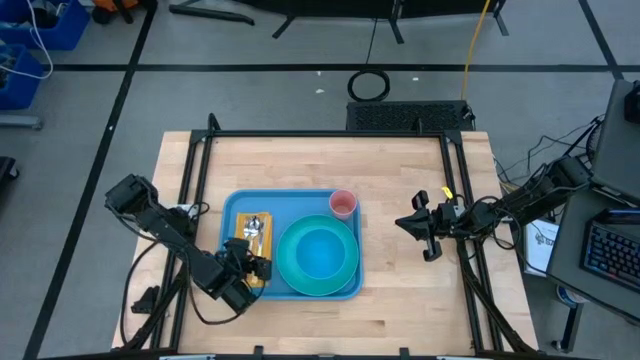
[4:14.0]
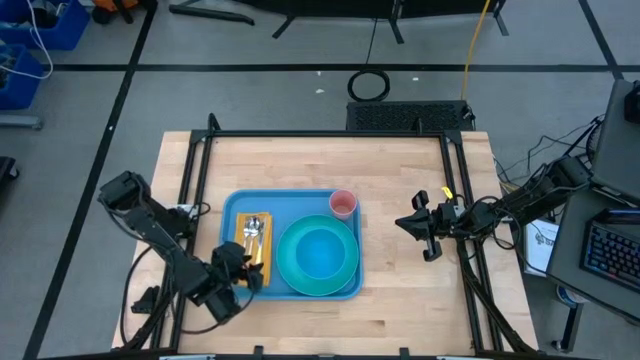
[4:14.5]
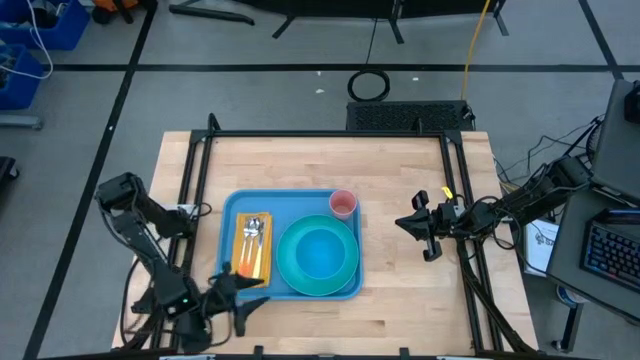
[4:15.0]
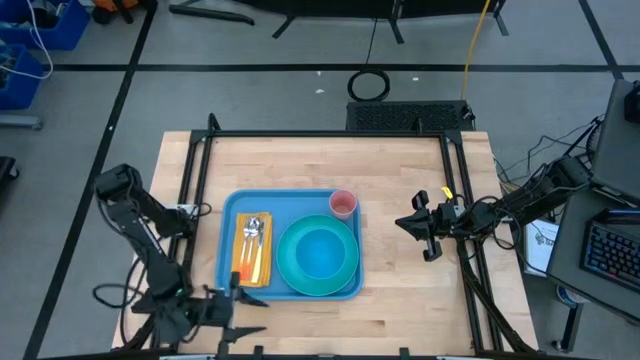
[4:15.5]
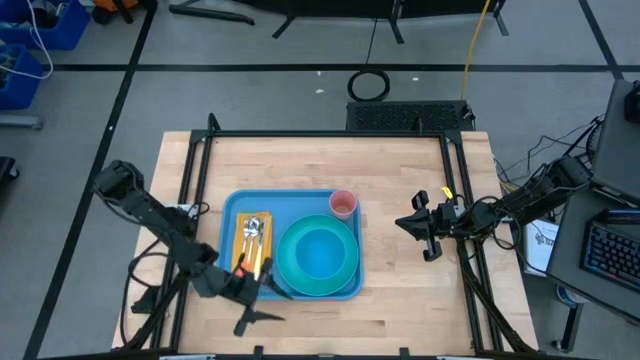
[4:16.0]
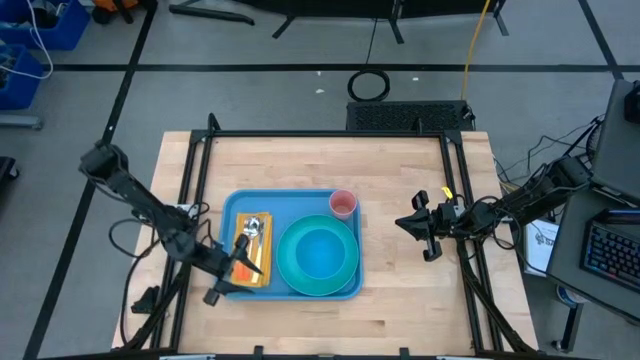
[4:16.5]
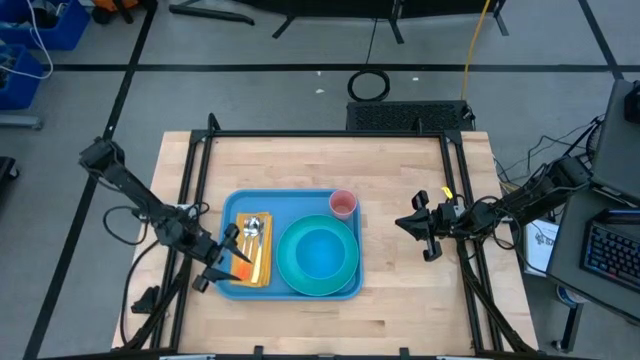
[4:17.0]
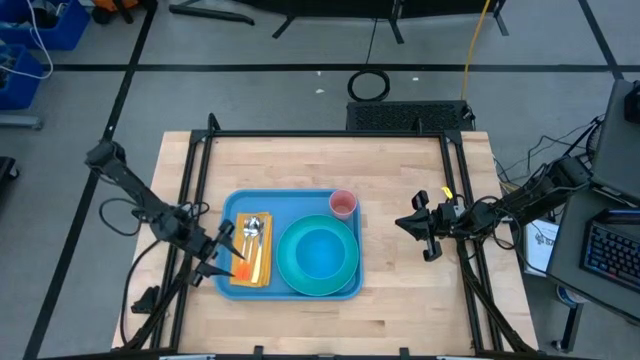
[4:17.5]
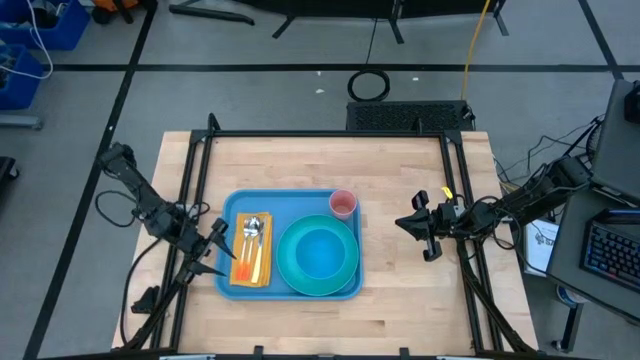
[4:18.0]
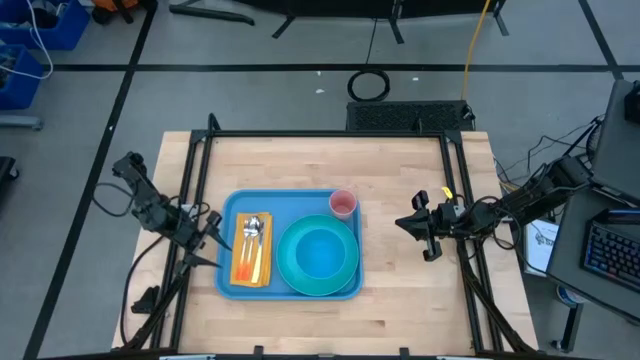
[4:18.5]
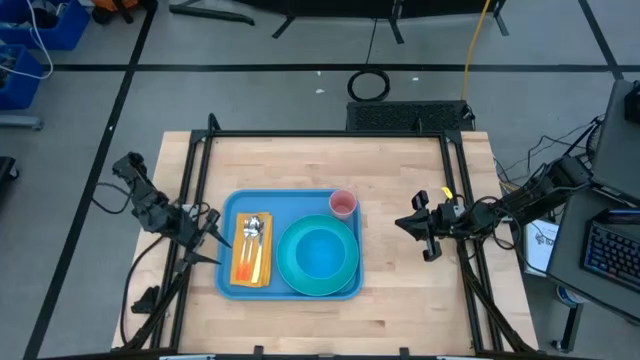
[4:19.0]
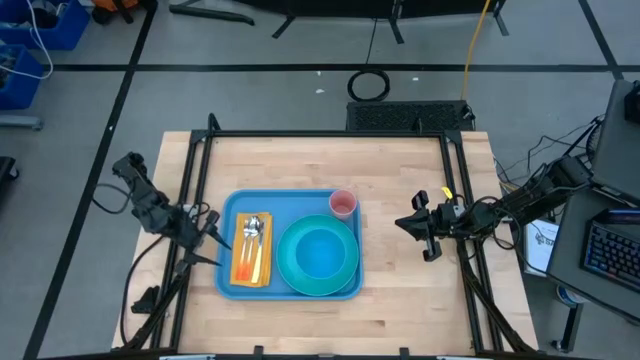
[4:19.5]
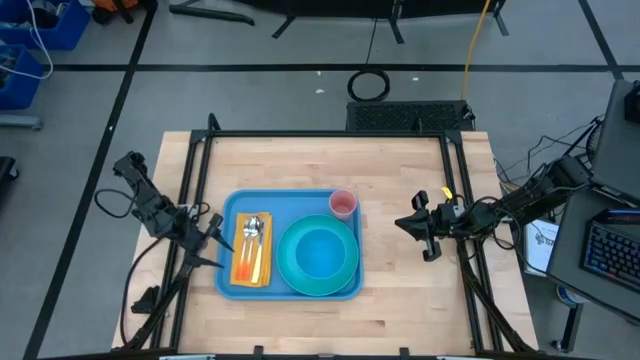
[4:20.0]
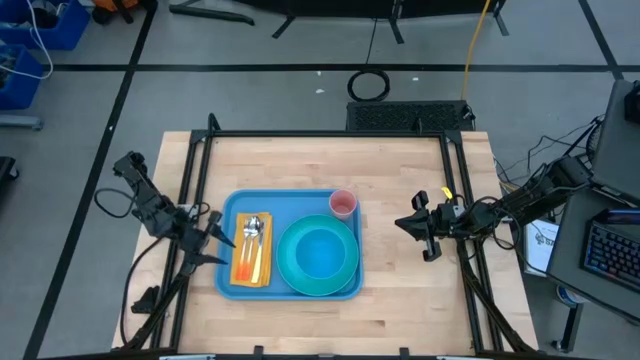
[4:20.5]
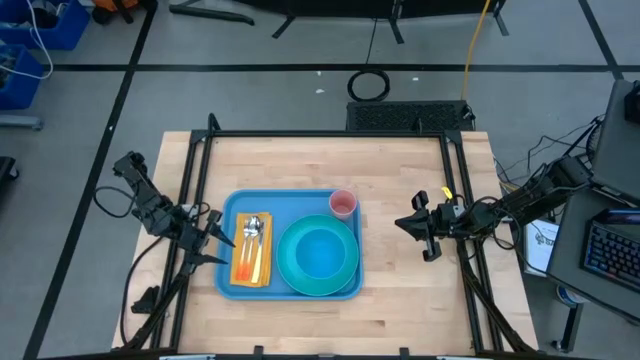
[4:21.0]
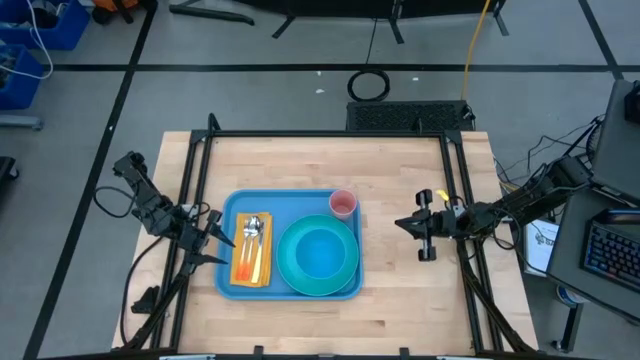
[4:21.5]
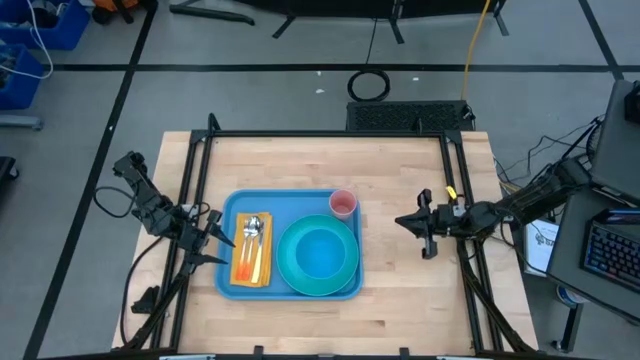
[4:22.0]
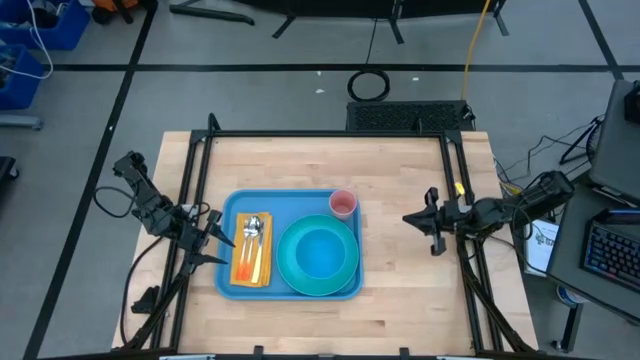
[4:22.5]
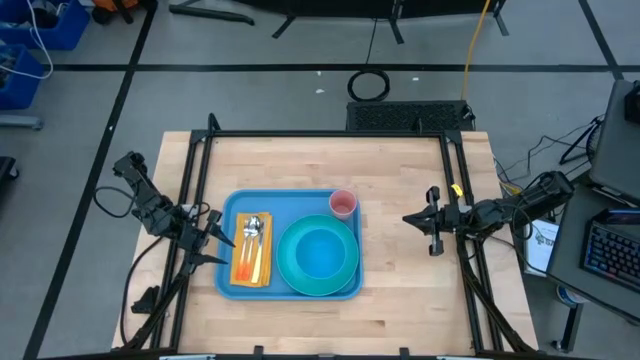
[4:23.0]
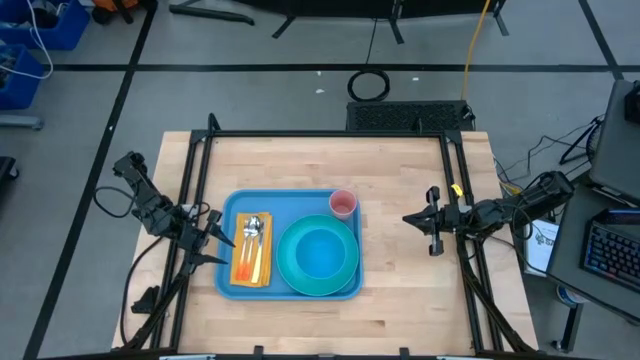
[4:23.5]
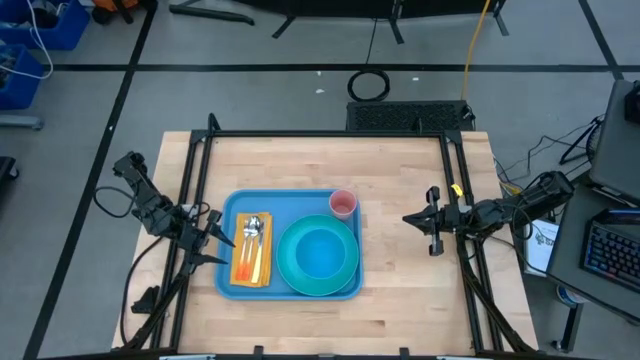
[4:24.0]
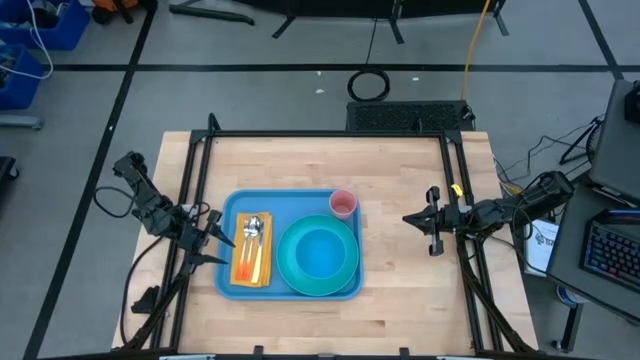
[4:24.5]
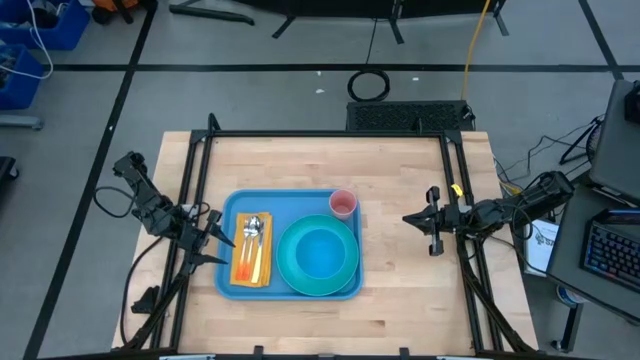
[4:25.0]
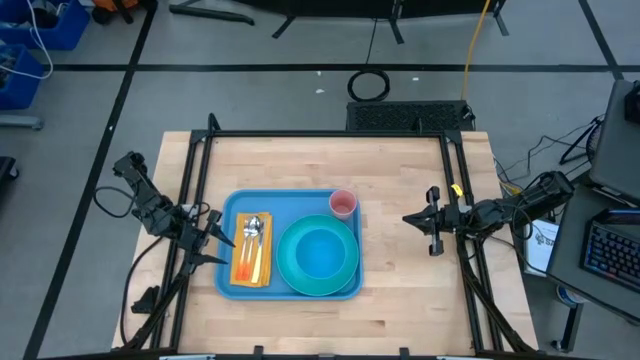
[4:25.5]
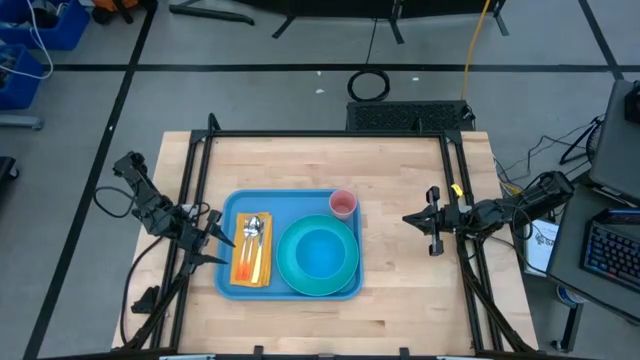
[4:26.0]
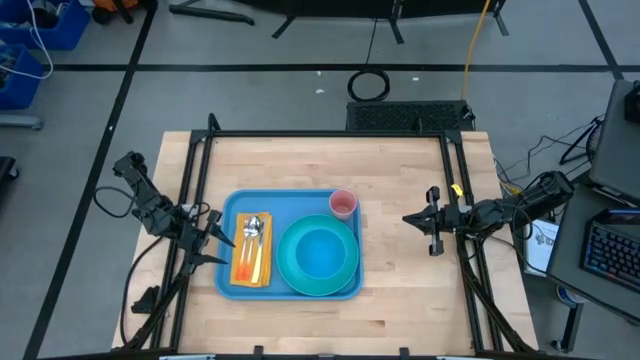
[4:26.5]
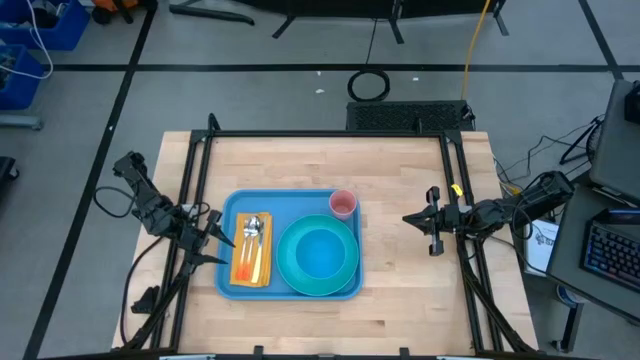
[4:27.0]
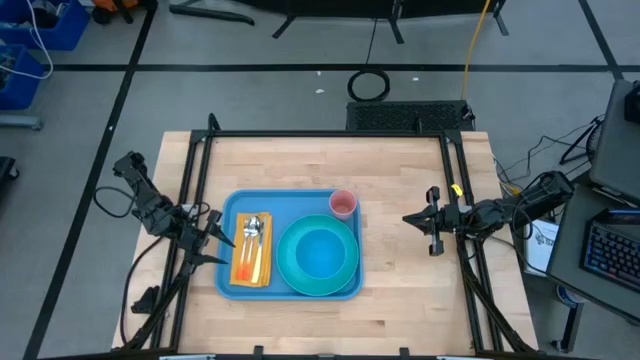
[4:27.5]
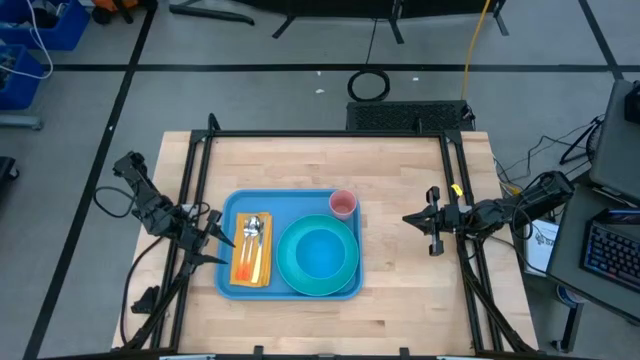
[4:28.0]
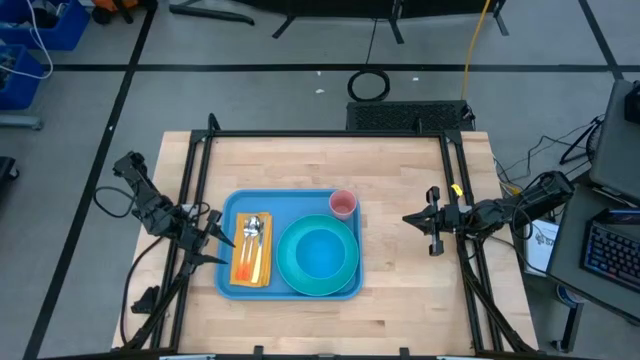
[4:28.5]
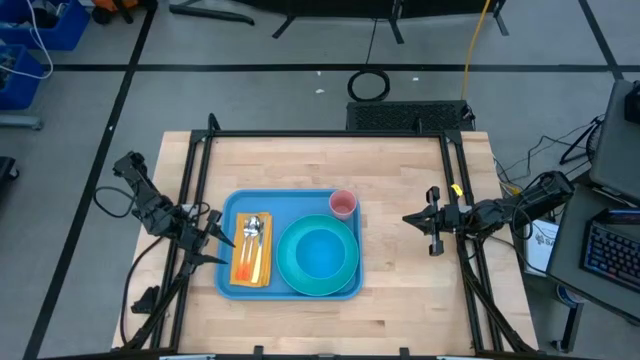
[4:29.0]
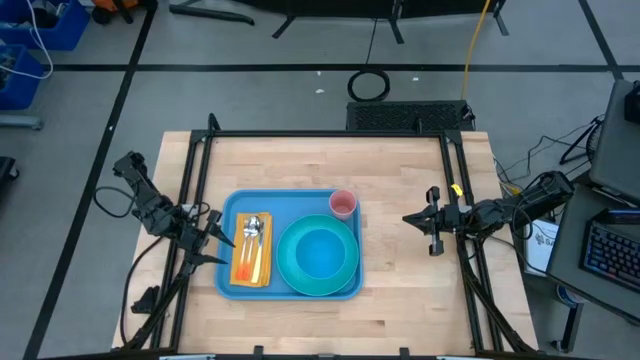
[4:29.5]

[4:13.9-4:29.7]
Task: Set up tray
Return to Home Position
